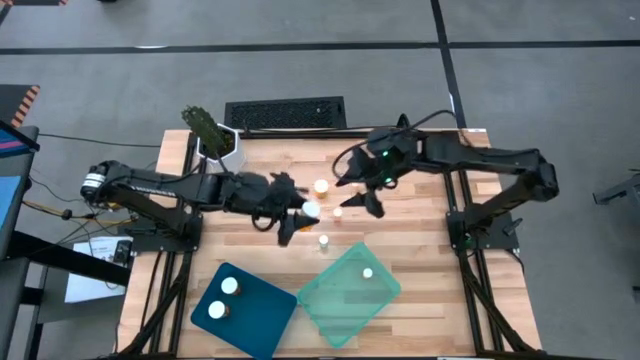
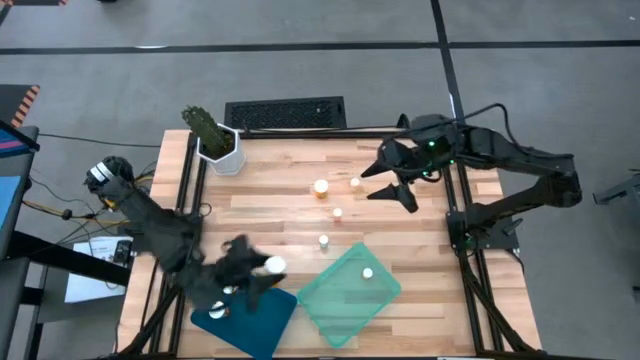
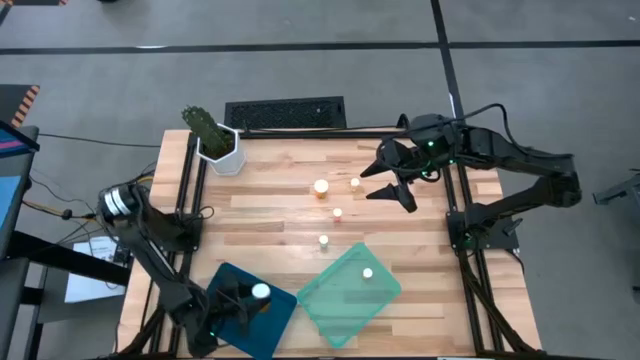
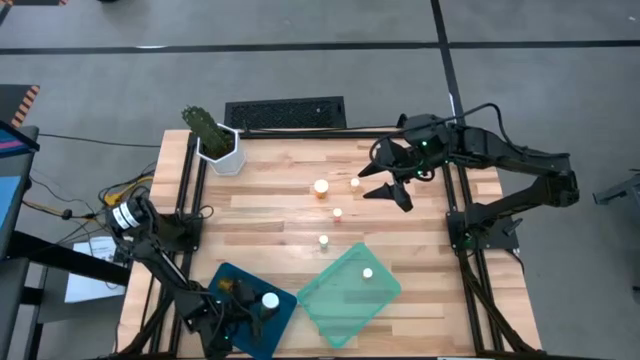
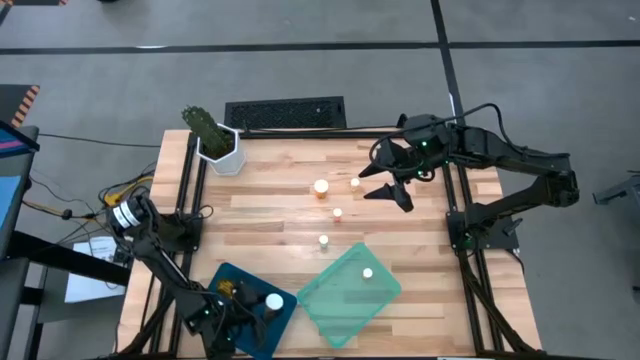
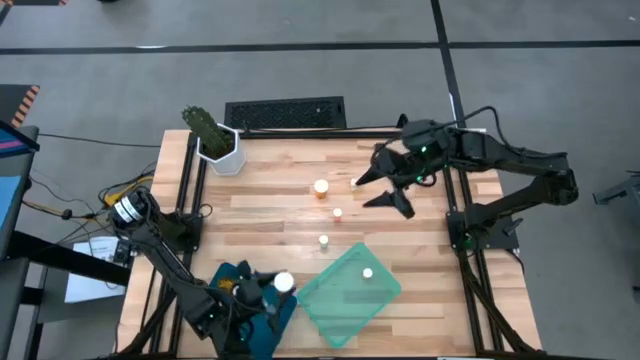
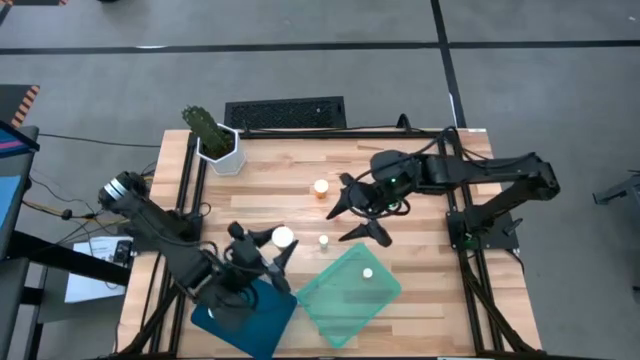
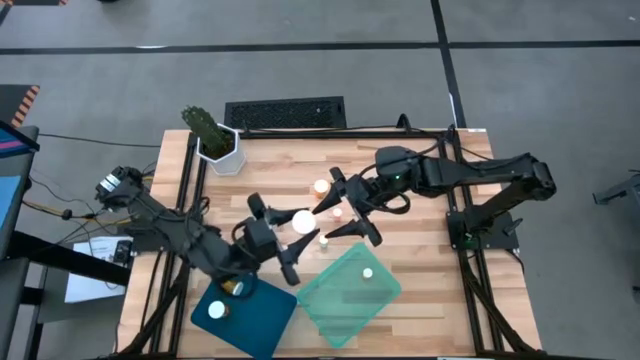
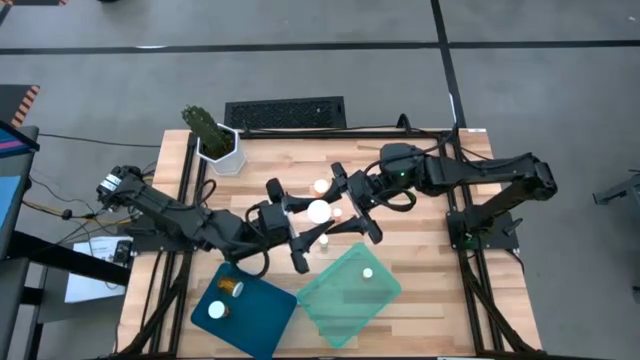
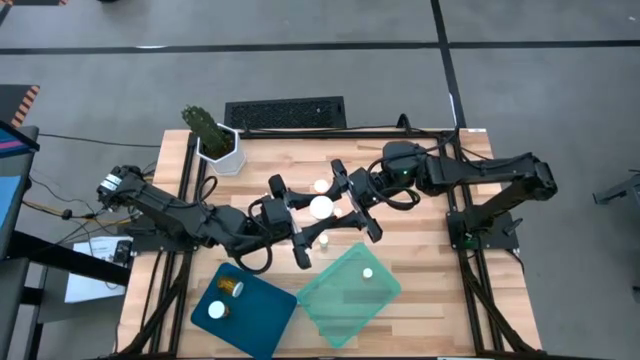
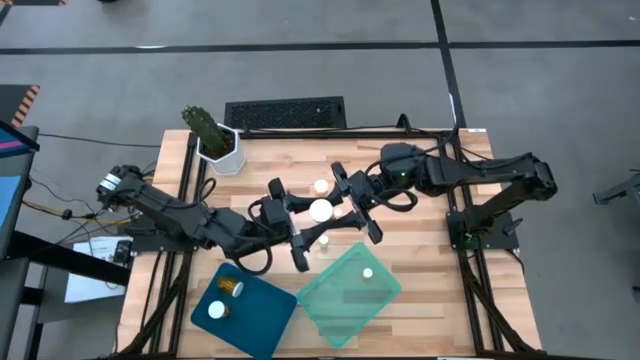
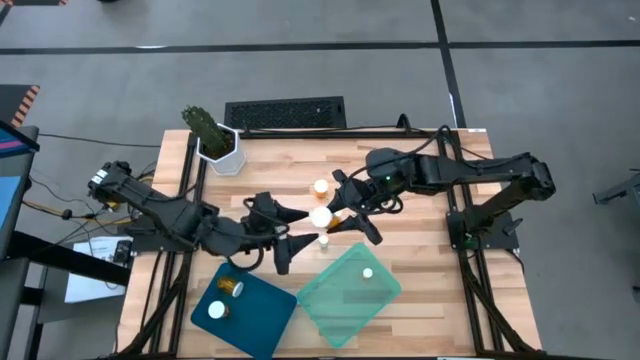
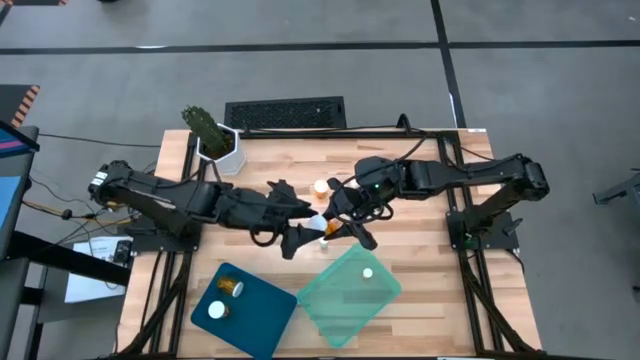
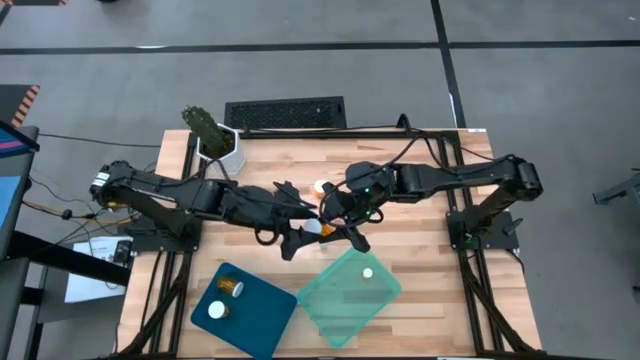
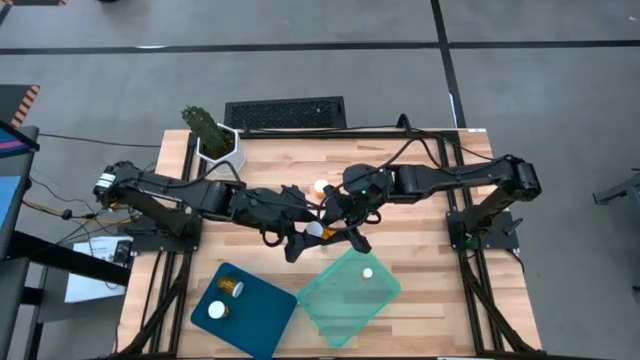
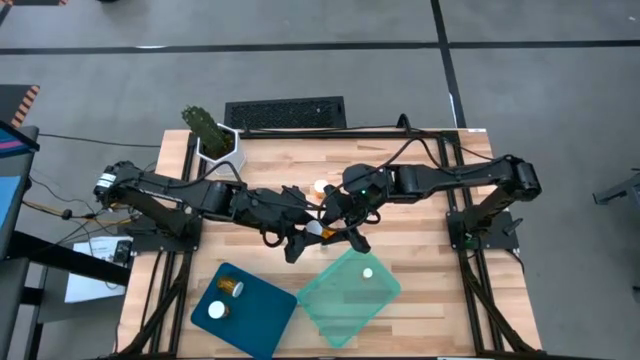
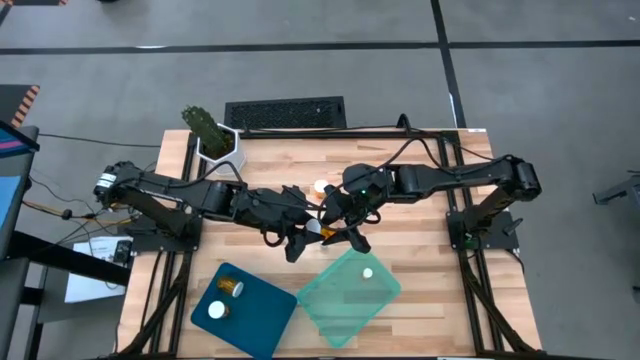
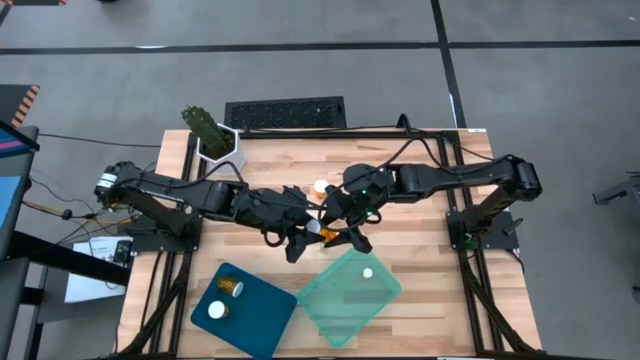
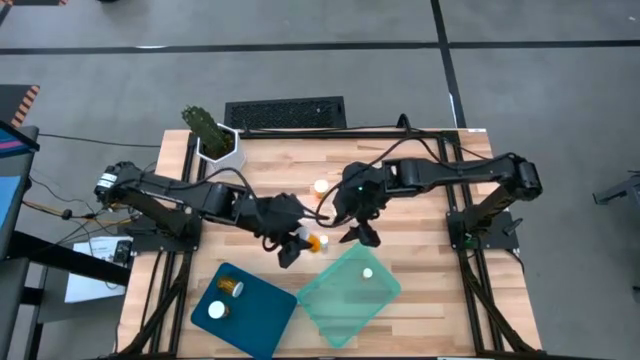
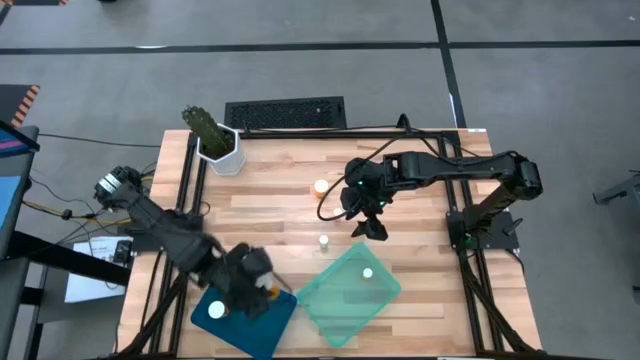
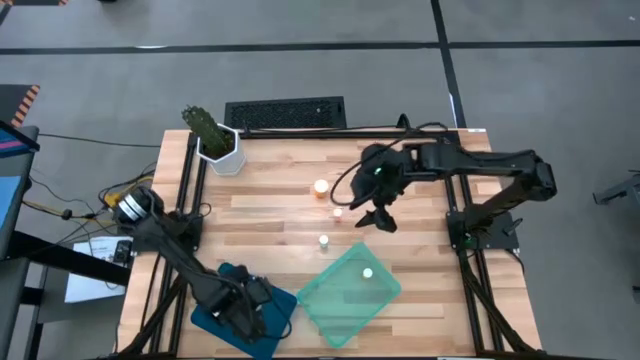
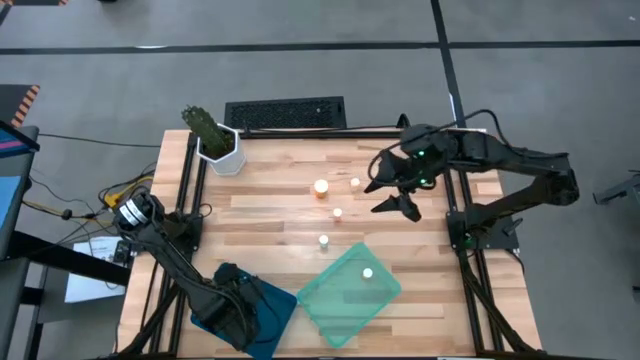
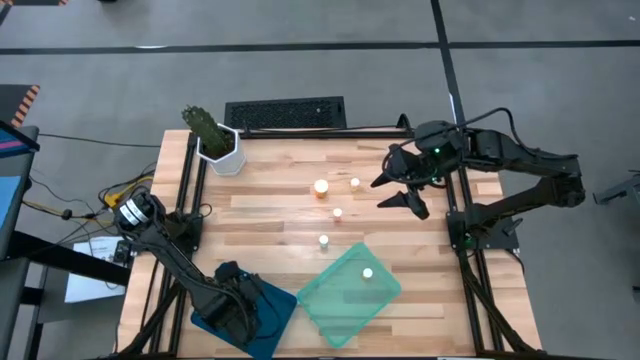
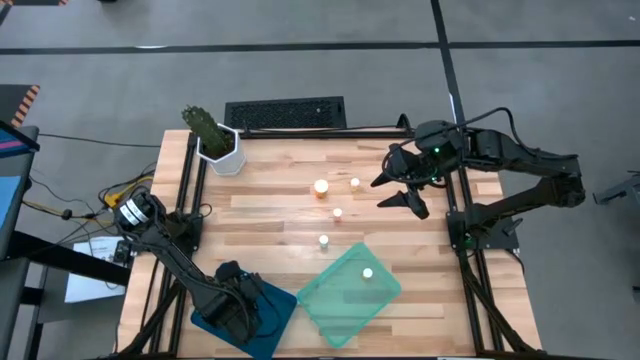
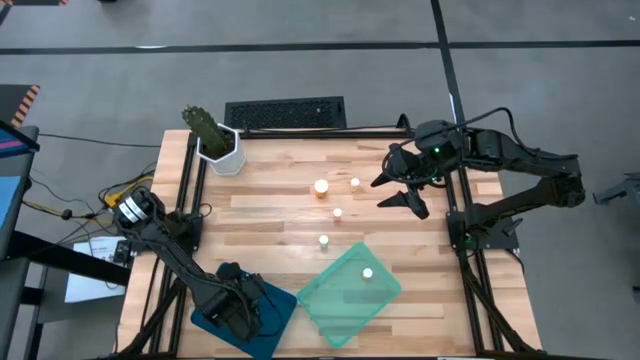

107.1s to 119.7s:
Task: Pick and place medicine bottles into bin by pill shape (circle, oval)
Put the big orange pill bottle into the blue bin

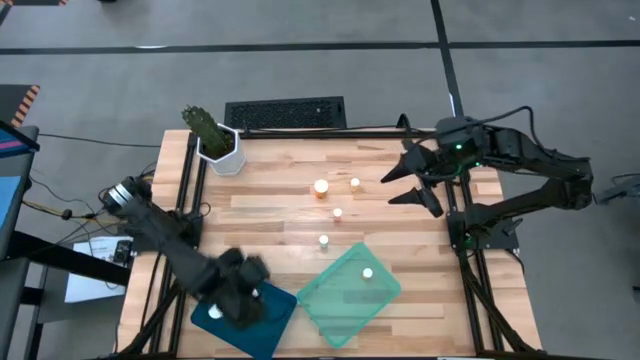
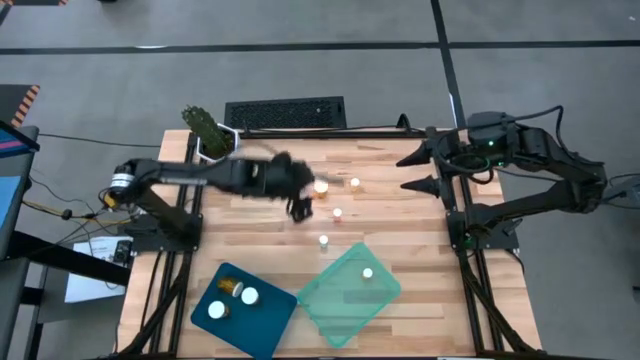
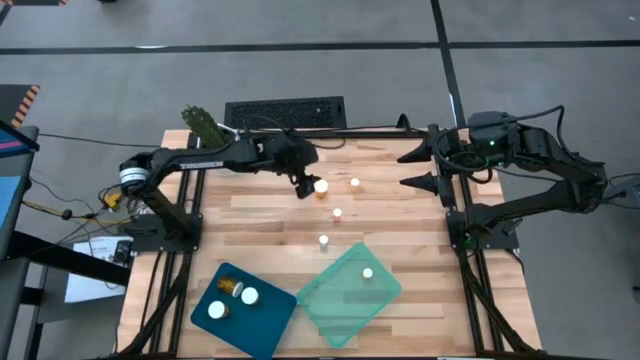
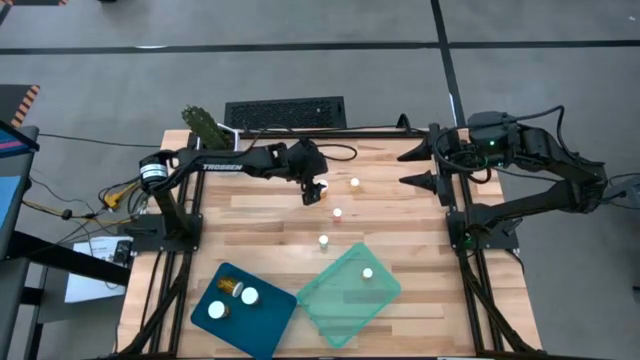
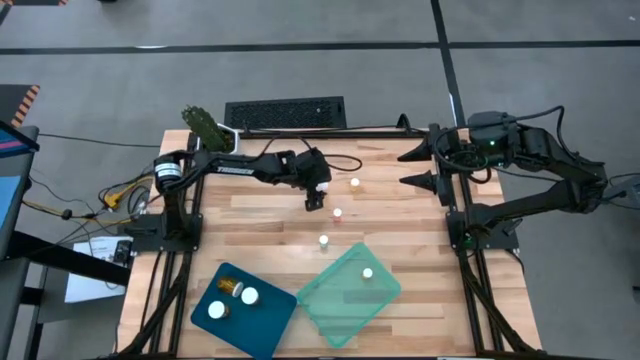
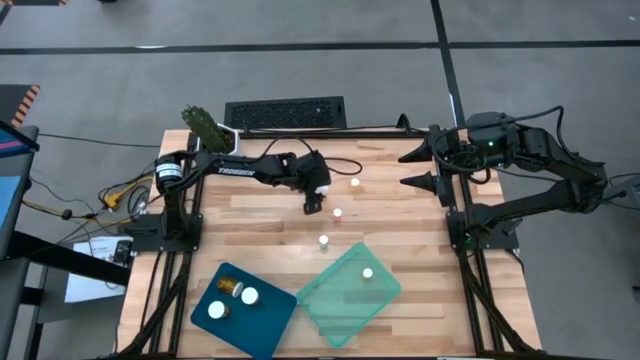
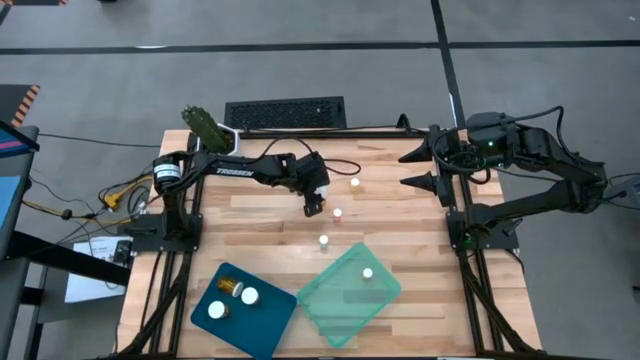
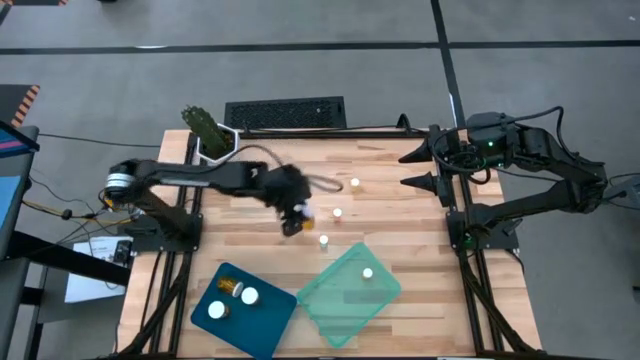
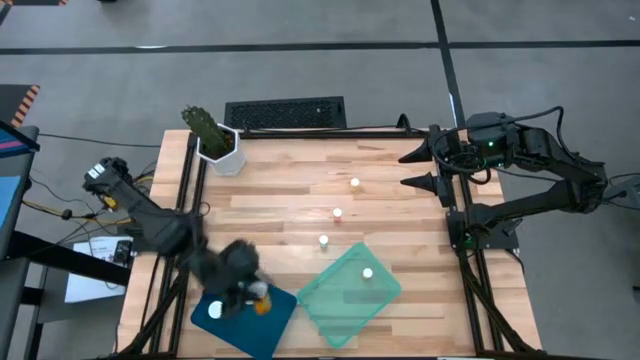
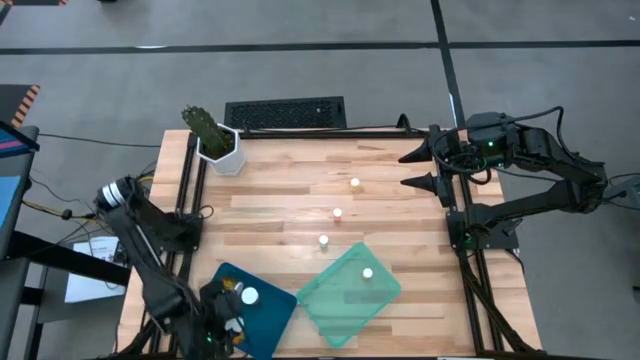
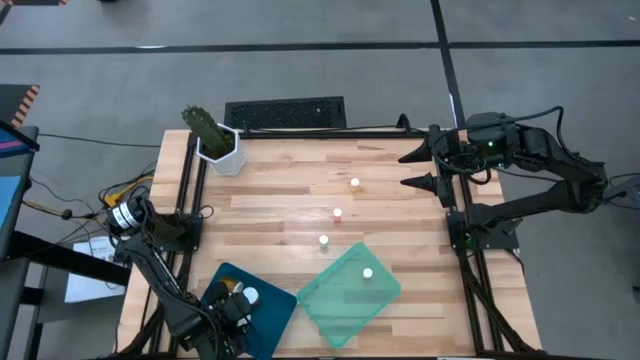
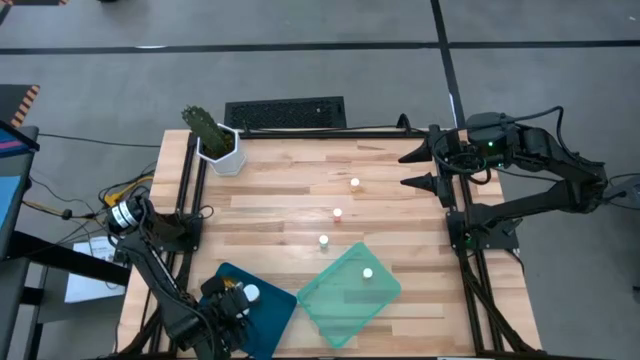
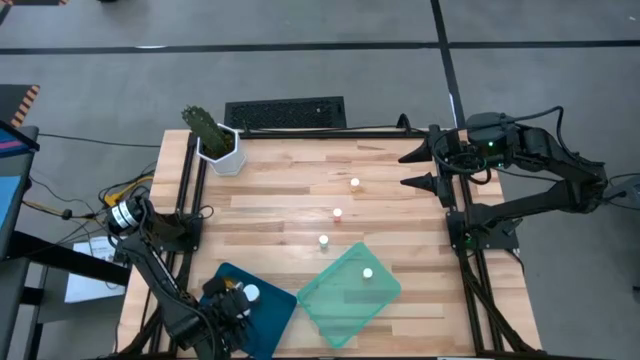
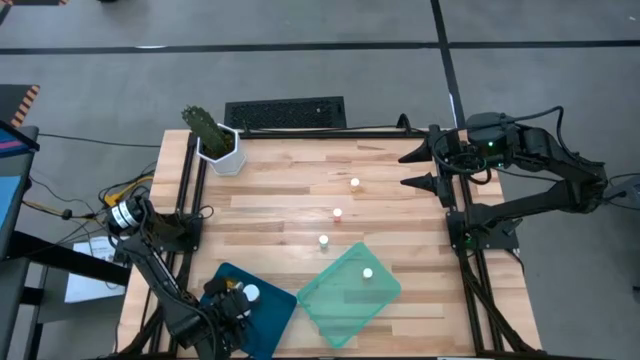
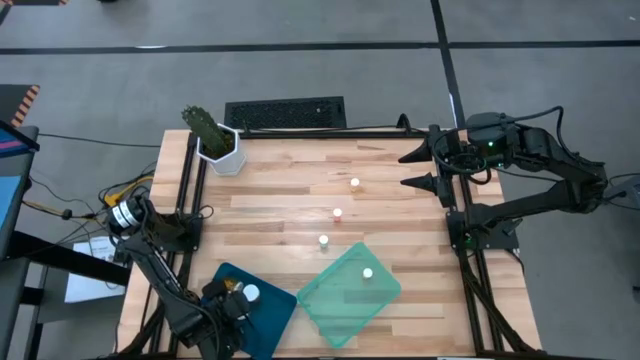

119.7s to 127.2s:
Put the big orange pill bottle into the blue bin

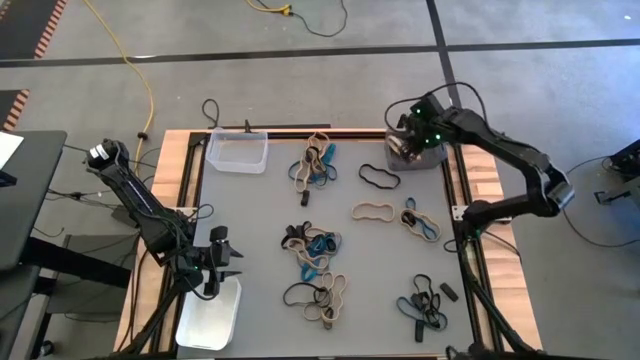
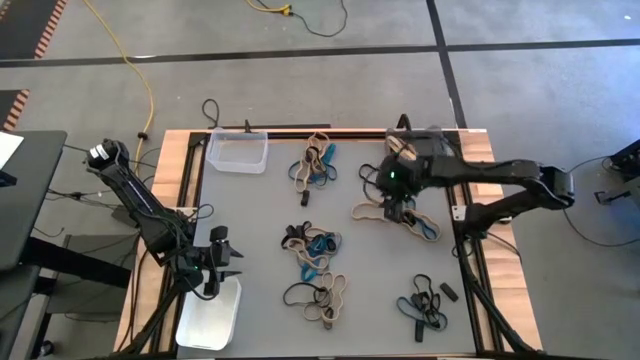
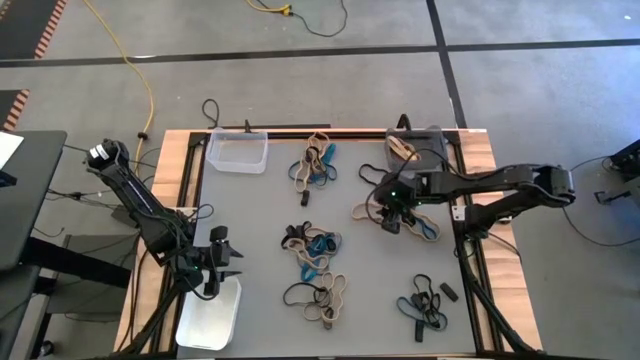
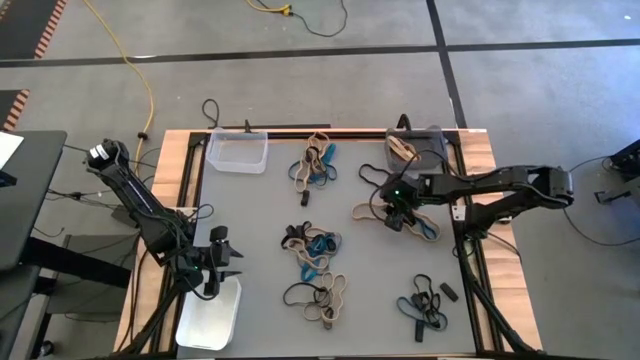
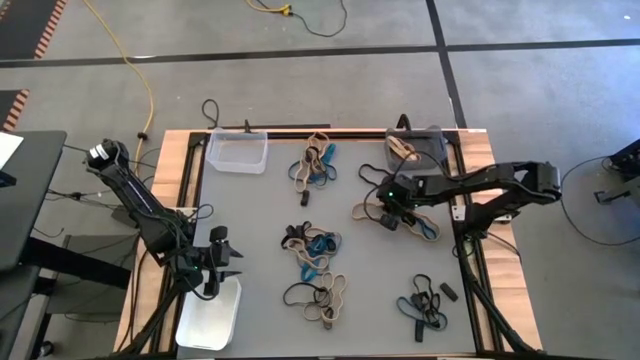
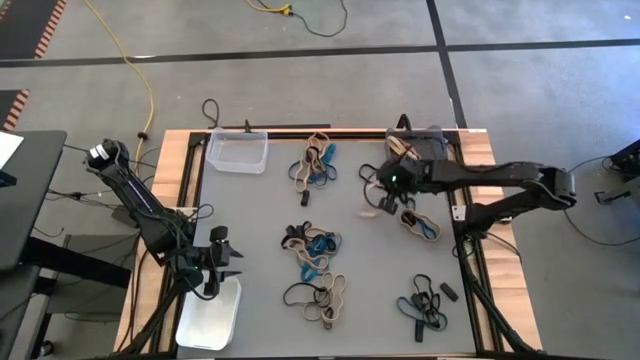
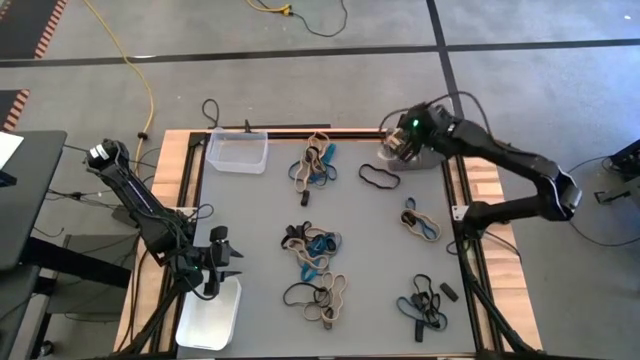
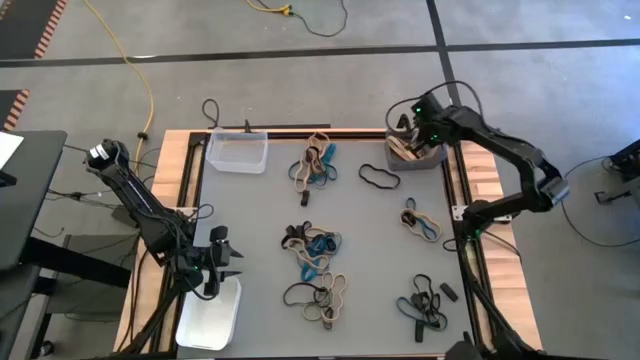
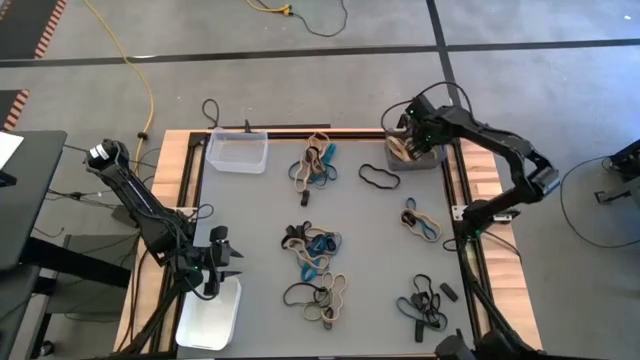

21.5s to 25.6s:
Task: Sort rubber bands into baskets
Put the white rubber band into the black transparent bin
